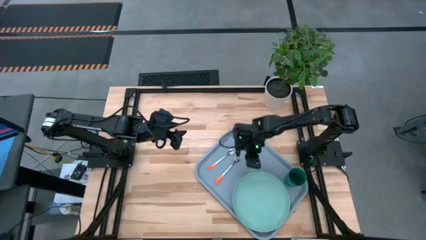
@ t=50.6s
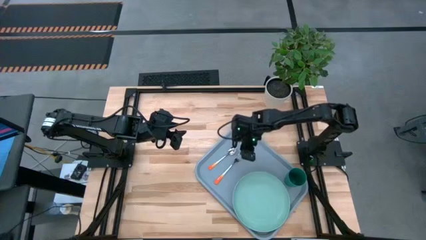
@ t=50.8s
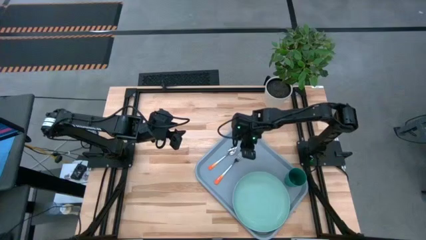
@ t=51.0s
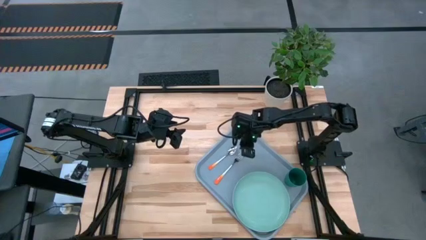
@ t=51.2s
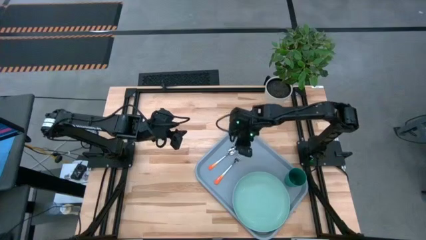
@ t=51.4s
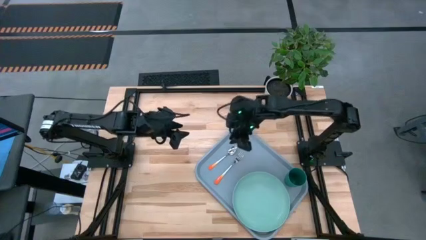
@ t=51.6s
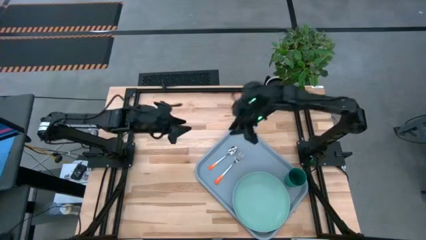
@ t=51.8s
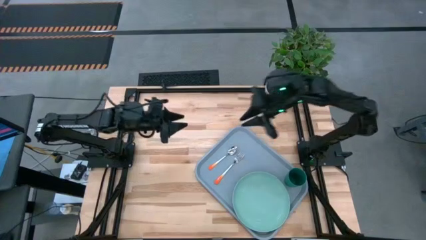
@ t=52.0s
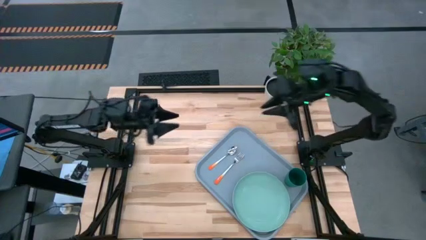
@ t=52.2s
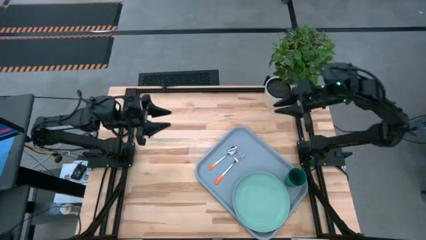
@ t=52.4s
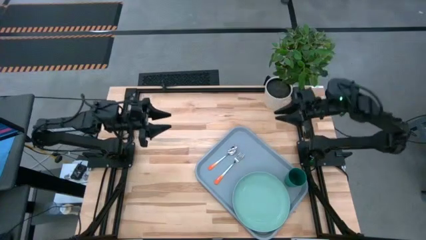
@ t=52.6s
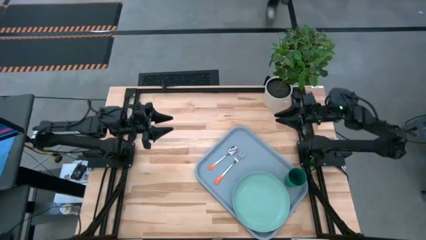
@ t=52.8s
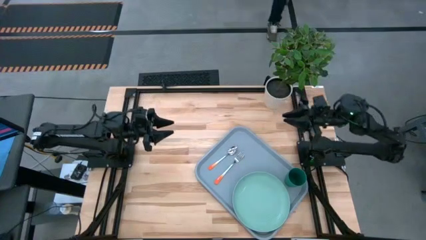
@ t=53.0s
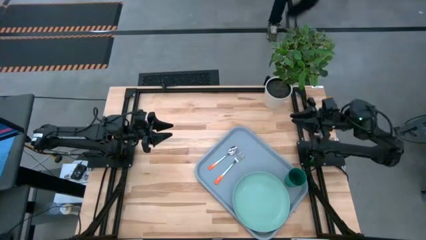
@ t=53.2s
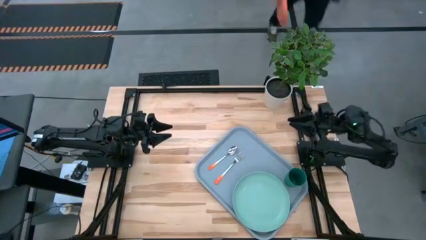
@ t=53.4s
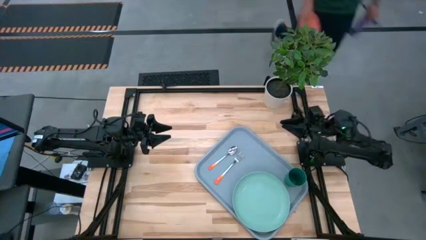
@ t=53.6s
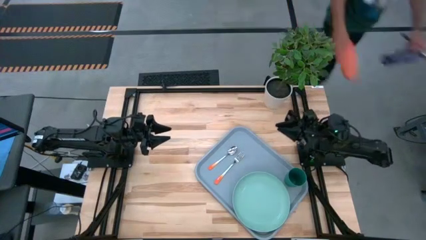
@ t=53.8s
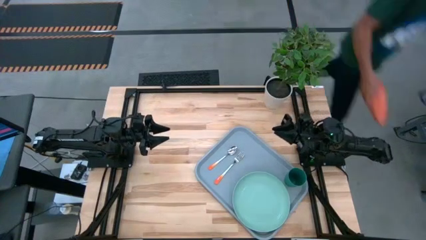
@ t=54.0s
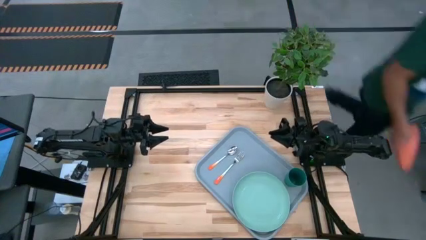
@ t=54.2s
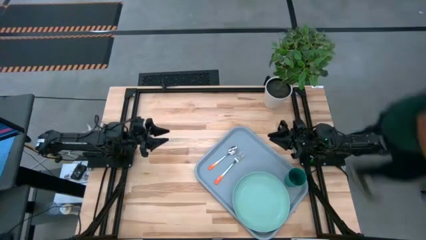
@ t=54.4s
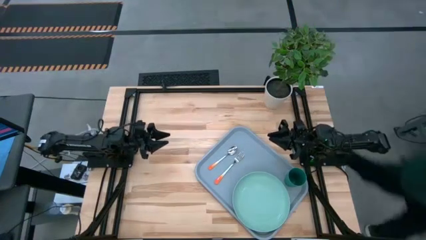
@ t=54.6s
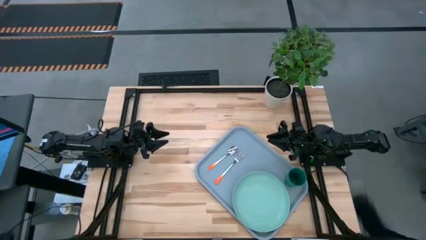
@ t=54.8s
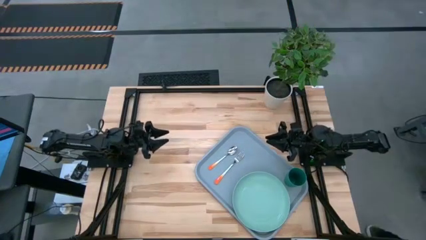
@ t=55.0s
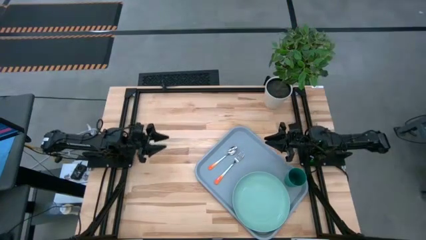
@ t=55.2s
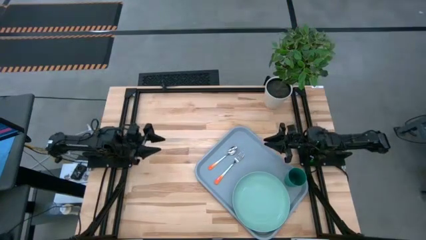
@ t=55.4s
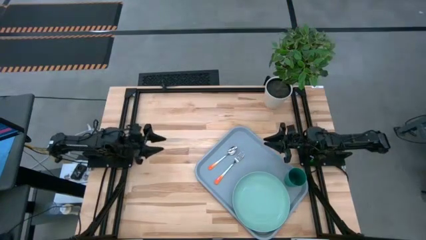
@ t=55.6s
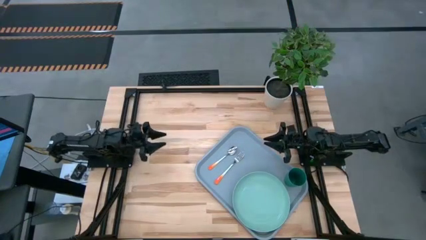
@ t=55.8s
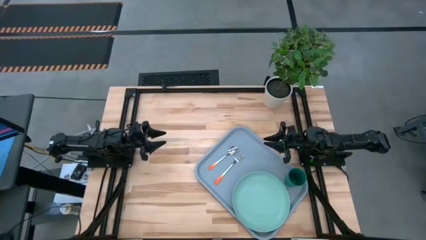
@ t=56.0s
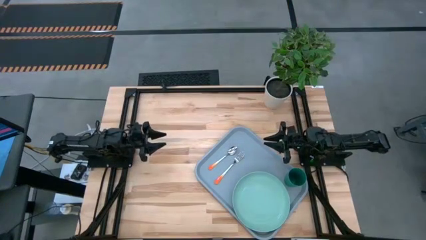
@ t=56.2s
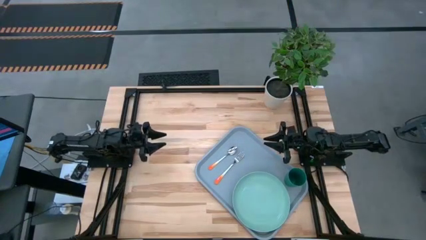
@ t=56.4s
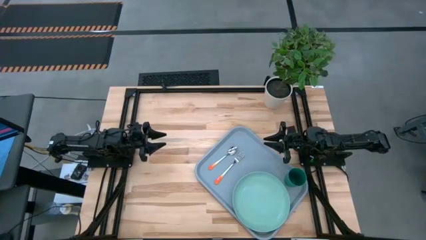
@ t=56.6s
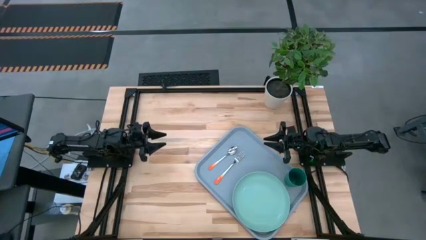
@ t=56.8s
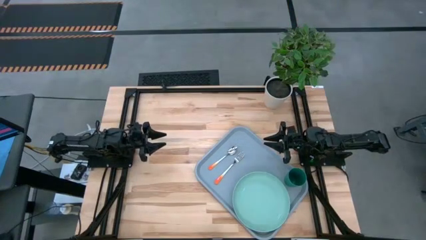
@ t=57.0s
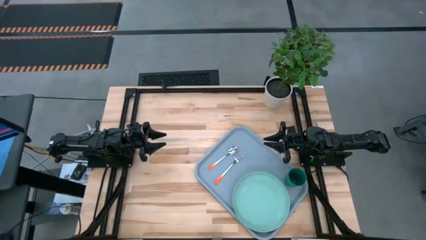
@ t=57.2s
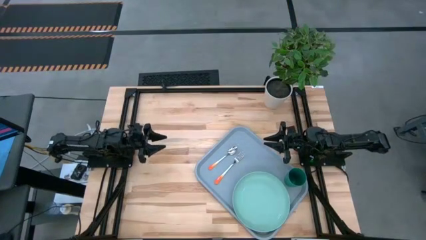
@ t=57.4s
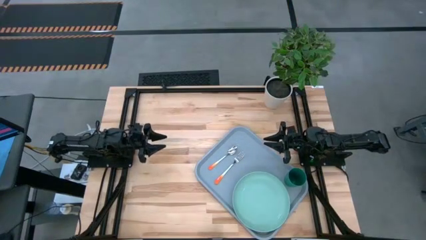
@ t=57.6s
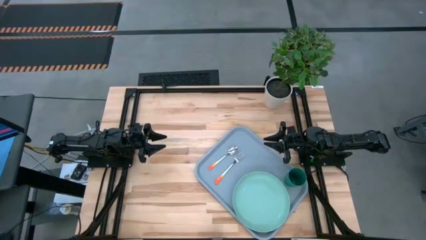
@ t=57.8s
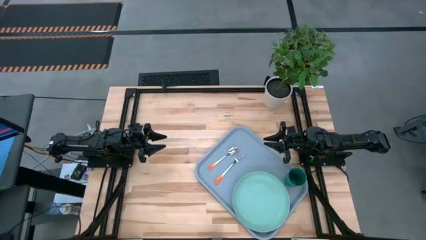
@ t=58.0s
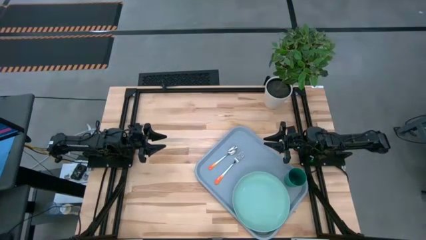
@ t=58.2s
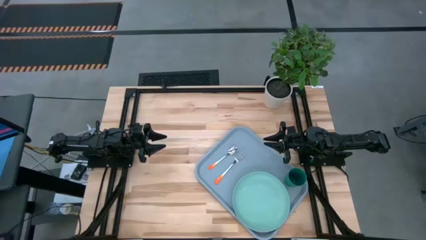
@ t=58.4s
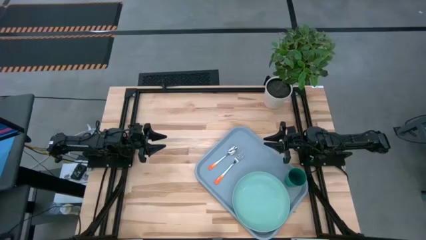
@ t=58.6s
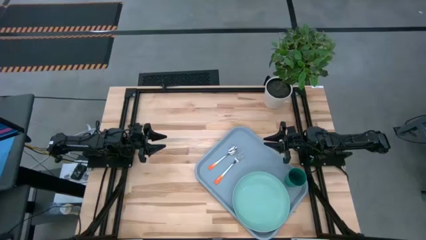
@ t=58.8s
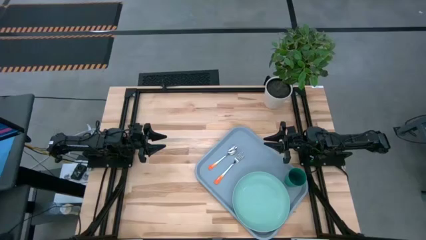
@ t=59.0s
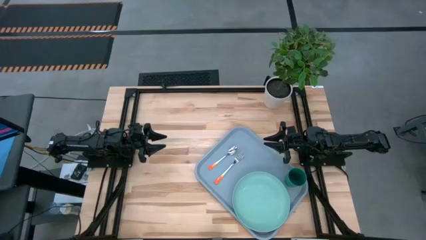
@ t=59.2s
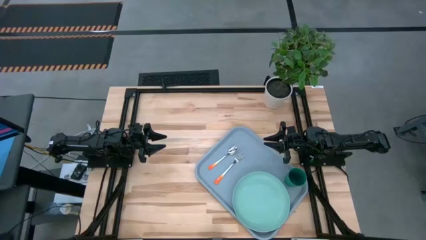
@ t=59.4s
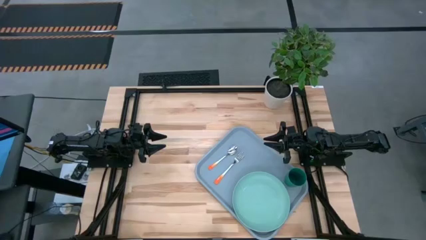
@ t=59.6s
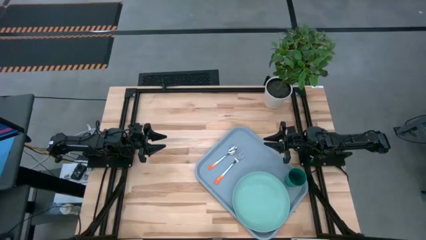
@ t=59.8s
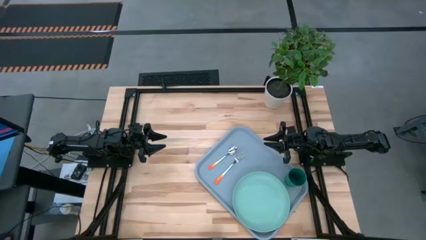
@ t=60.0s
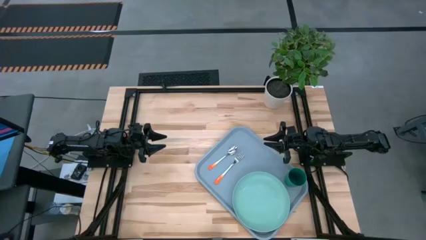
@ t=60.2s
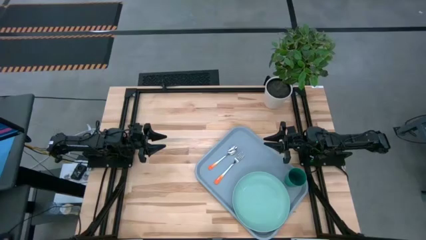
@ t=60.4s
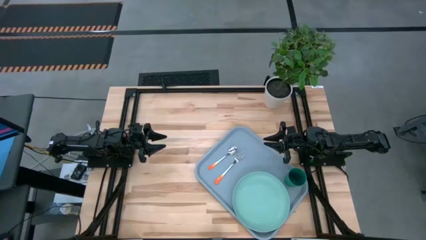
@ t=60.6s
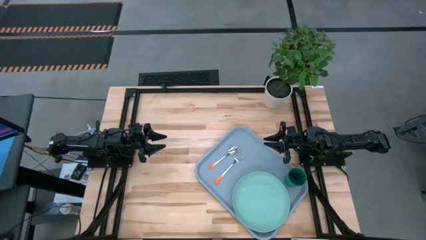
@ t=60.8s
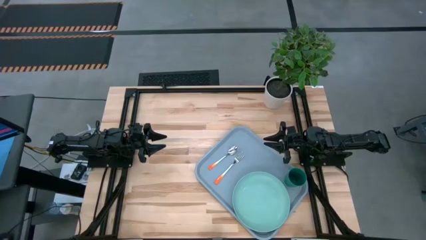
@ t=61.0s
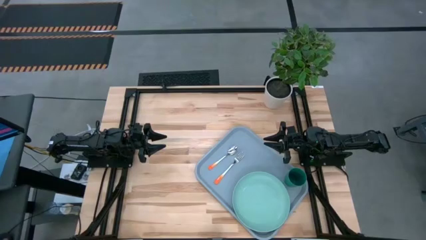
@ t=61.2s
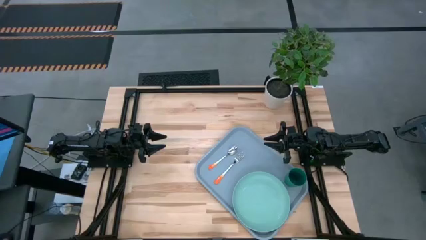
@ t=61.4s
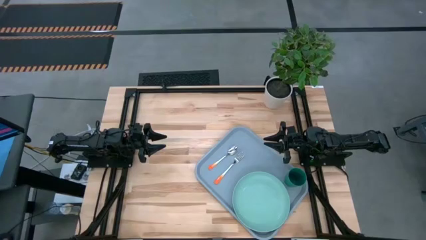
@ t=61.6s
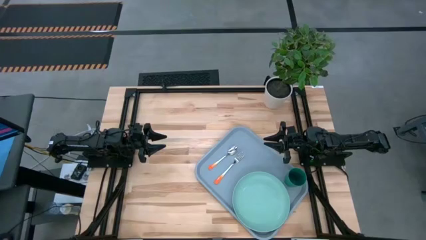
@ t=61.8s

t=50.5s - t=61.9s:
Task: Pick and place plate/cup/fork/spoon on tray
Return to Home Position

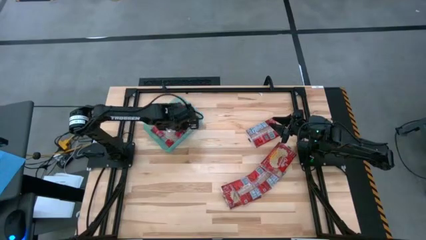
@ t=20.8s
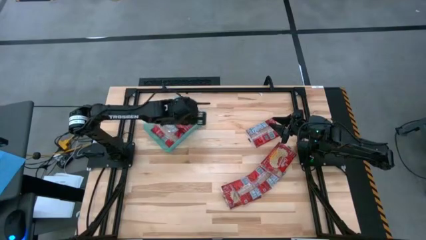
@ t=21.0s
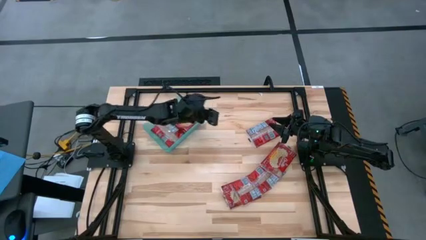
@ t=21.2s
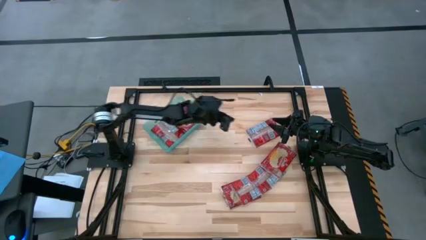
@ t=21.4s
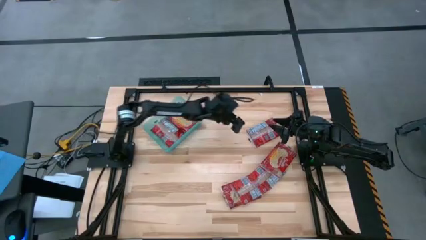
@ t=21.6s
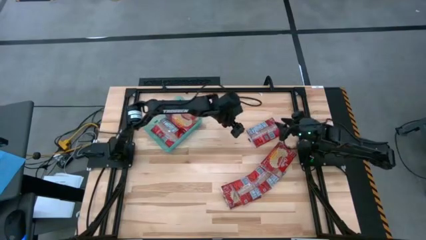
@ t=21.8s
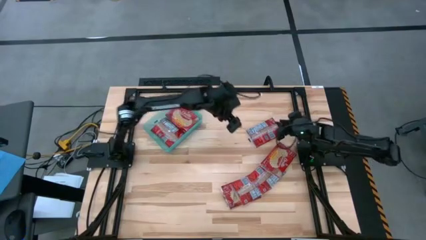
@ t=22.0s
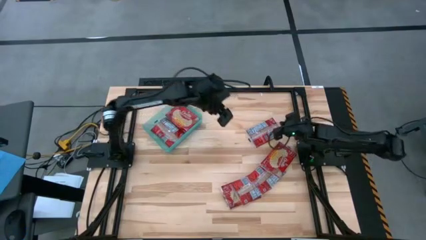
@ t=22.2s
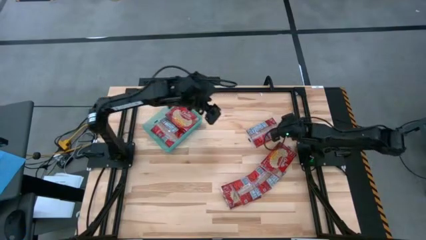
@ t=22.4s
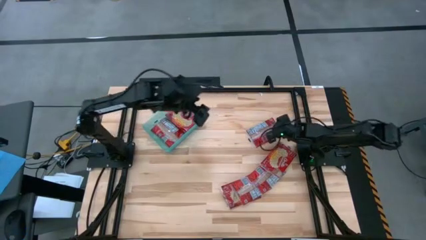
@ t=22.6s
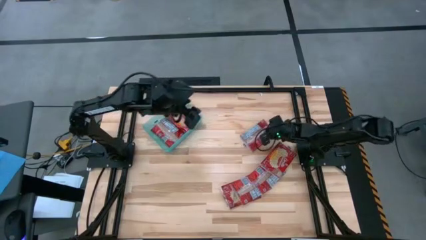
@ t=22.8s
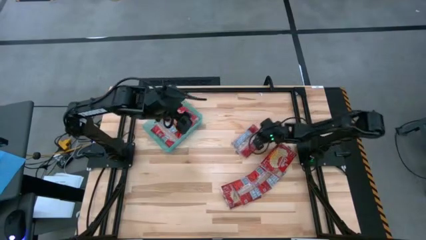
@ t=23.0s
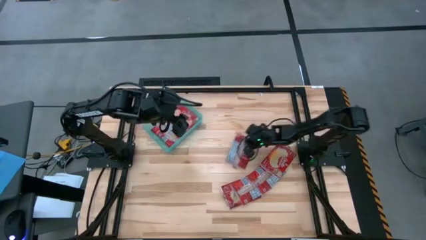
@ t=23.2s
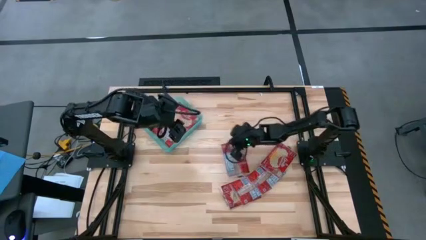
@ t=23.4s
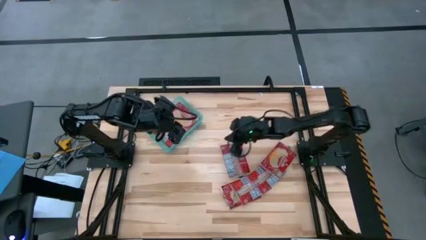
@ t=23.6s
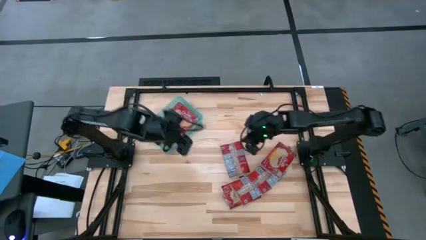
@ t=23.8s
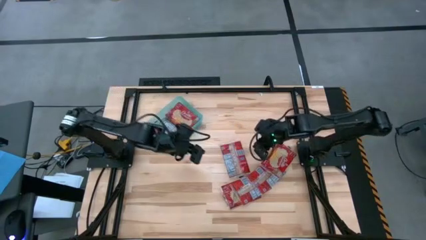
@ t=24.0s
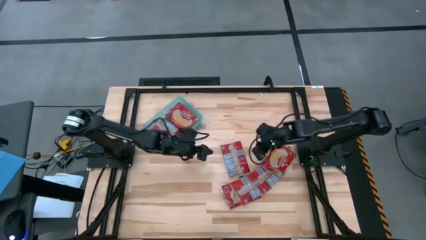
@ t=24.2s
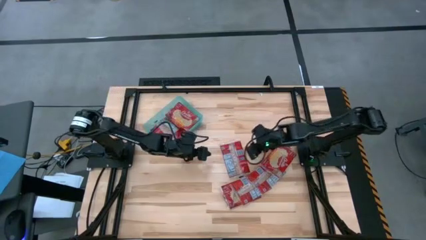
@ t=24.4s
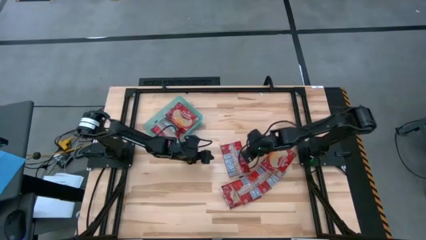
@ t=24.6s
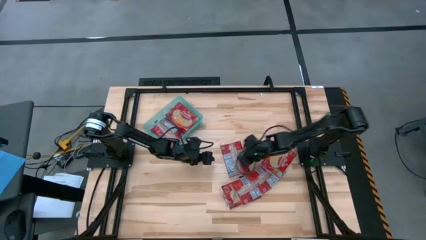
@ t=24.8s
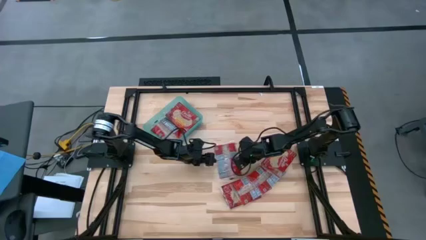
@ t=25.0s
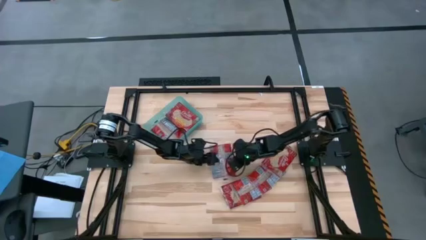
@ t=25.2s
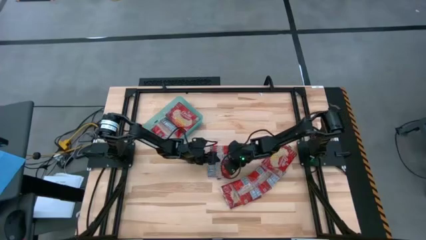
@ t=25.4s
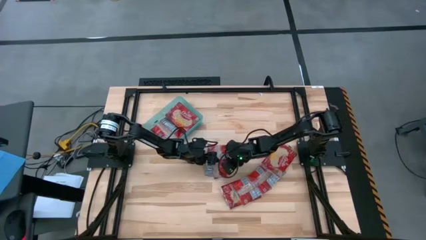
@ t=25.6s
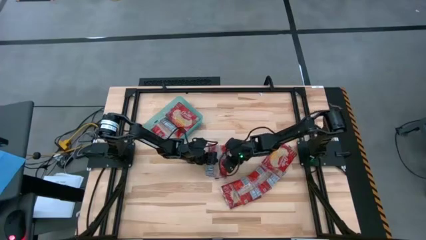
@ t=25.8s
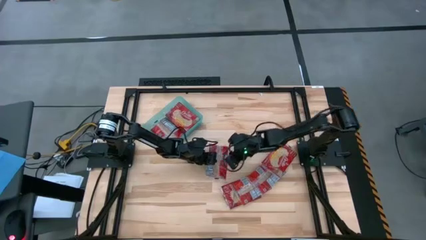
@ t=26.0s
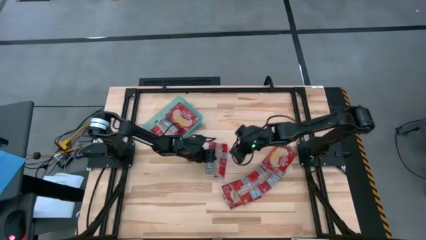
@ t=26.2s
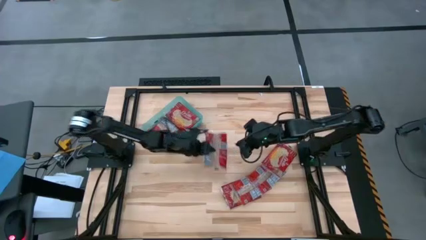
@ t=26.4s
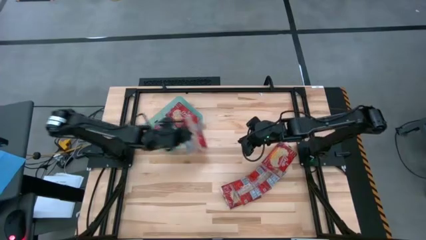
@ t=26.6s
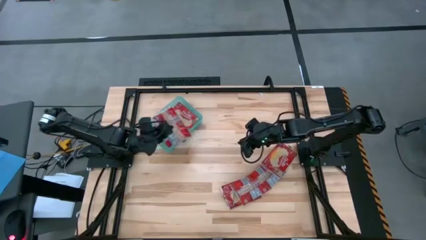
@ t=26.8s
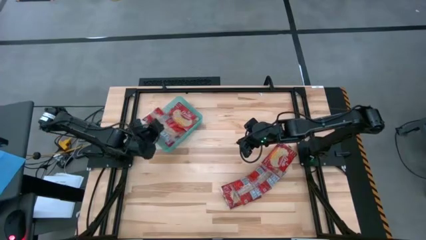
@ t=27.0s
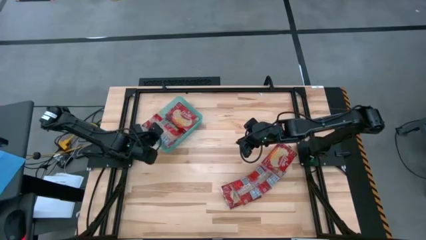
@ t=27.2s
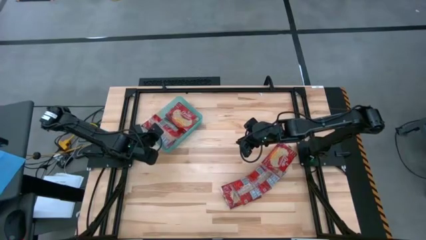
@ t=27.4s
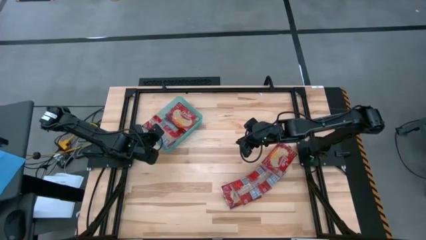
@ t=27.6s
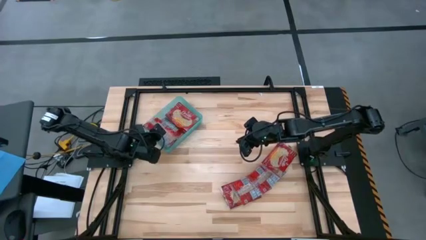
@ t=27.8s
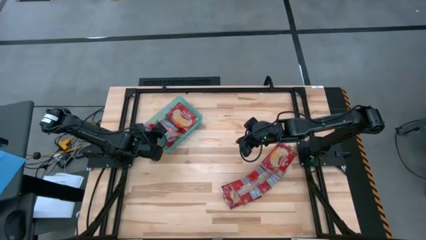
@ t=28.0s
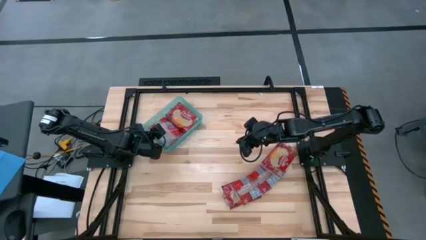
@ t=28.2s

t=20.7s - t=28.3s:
Task: Sort popcorn bags into baskets
Put the red popcorn bag into the blue bin
